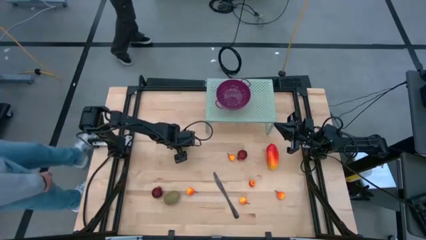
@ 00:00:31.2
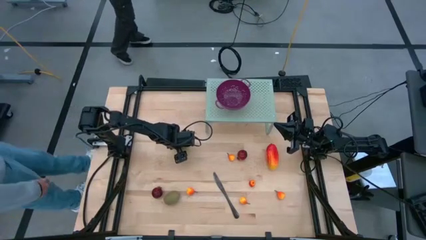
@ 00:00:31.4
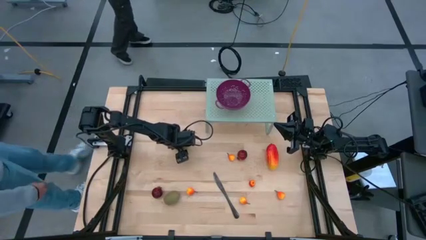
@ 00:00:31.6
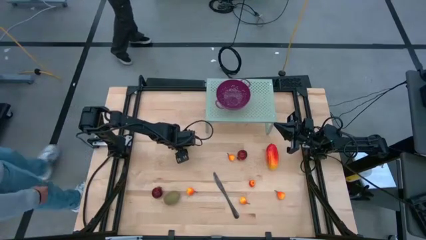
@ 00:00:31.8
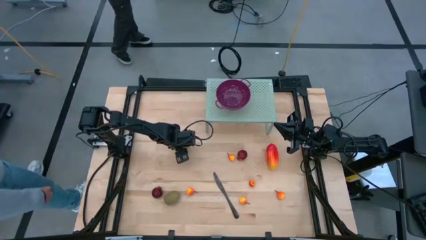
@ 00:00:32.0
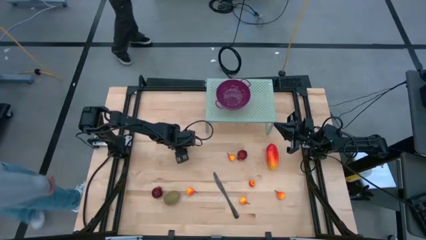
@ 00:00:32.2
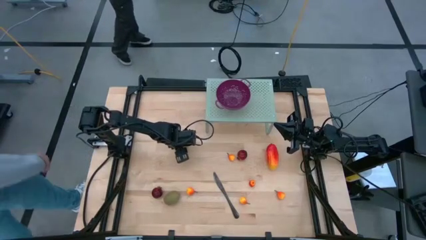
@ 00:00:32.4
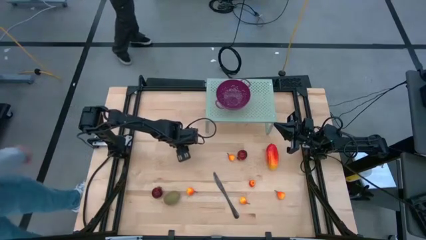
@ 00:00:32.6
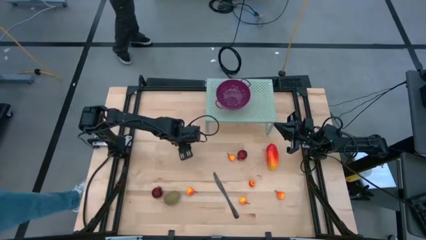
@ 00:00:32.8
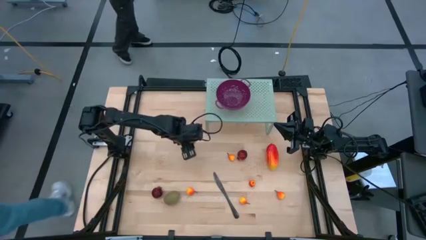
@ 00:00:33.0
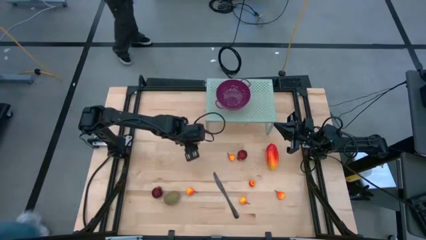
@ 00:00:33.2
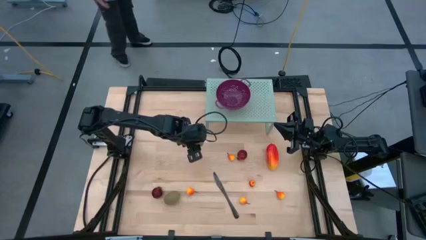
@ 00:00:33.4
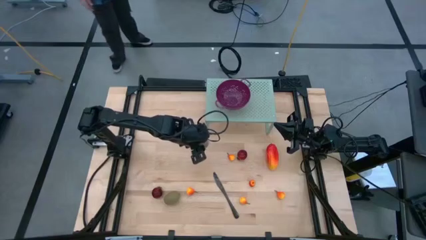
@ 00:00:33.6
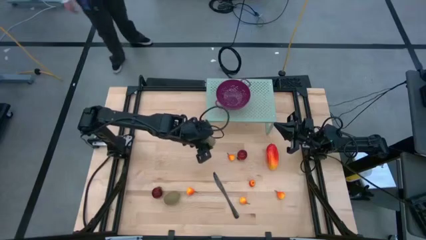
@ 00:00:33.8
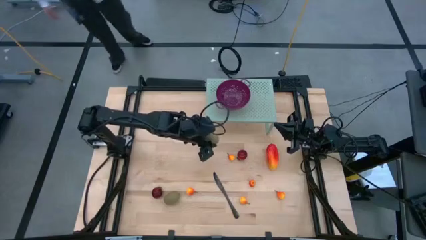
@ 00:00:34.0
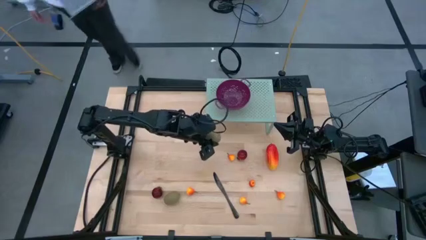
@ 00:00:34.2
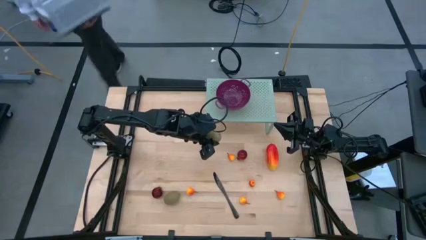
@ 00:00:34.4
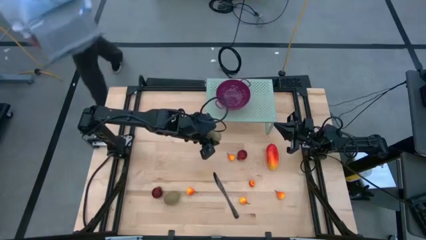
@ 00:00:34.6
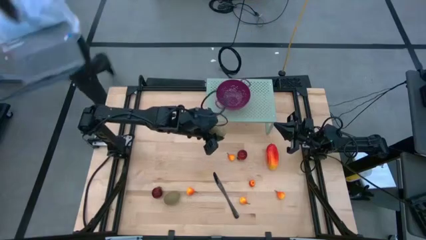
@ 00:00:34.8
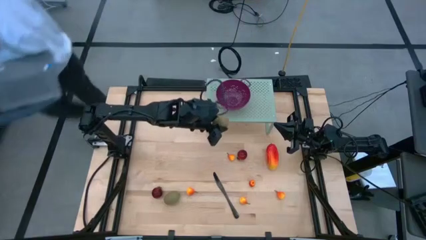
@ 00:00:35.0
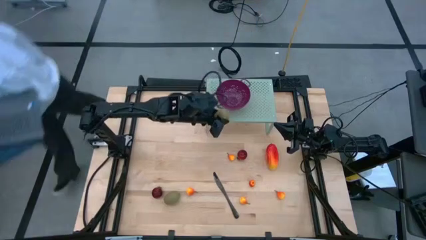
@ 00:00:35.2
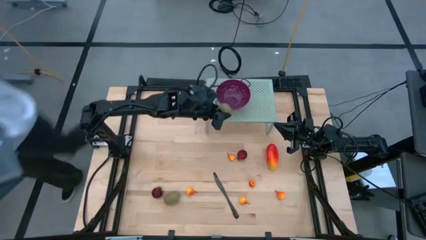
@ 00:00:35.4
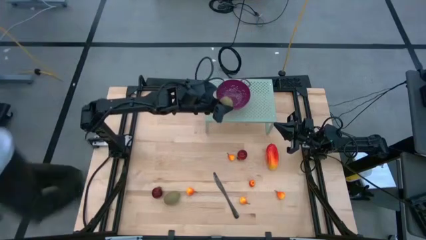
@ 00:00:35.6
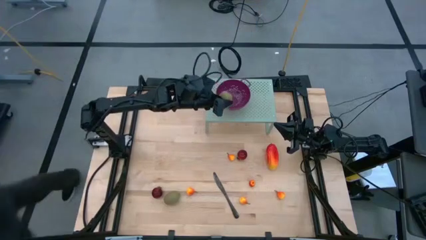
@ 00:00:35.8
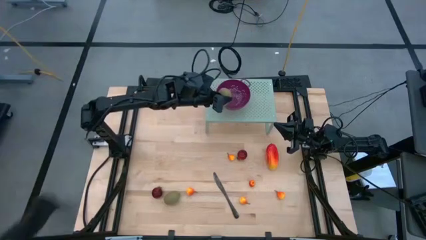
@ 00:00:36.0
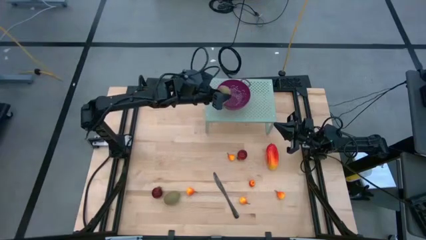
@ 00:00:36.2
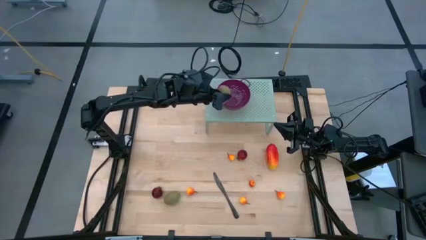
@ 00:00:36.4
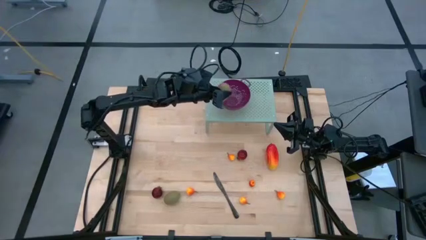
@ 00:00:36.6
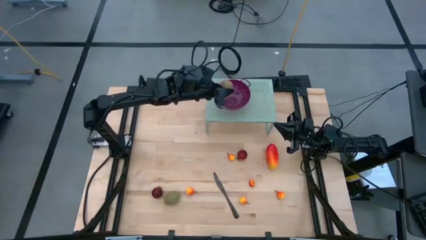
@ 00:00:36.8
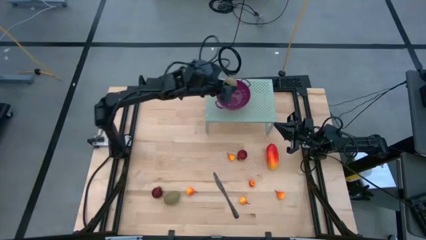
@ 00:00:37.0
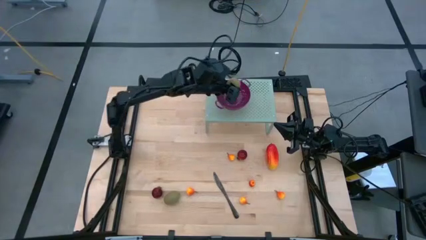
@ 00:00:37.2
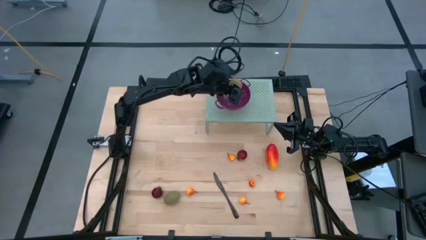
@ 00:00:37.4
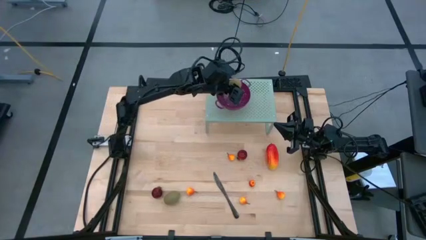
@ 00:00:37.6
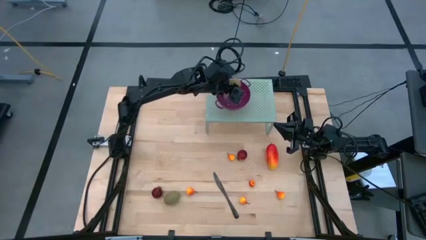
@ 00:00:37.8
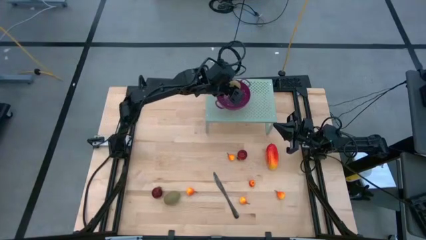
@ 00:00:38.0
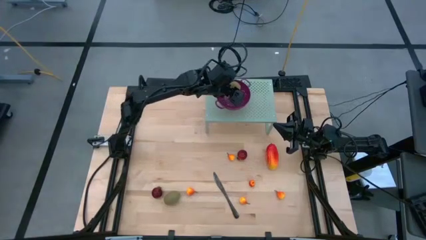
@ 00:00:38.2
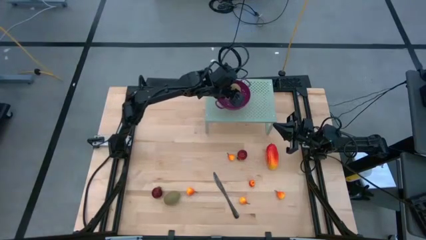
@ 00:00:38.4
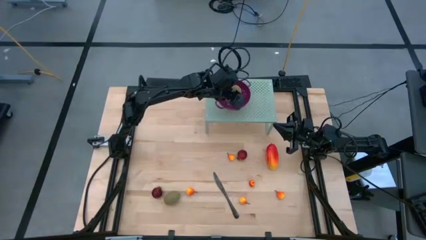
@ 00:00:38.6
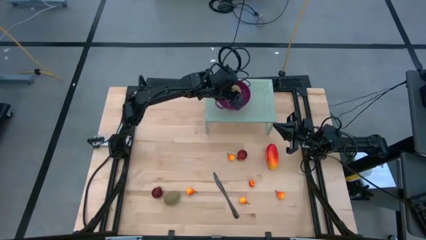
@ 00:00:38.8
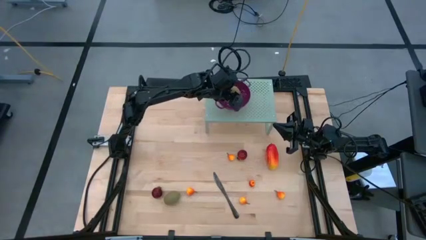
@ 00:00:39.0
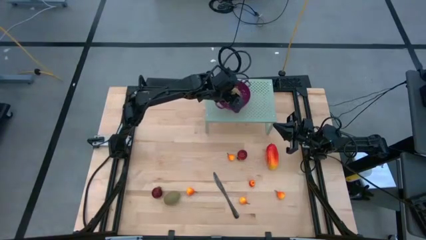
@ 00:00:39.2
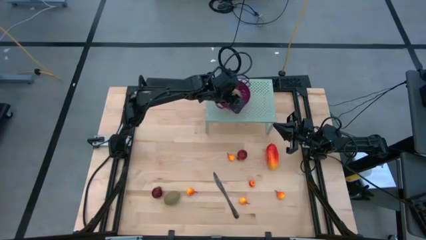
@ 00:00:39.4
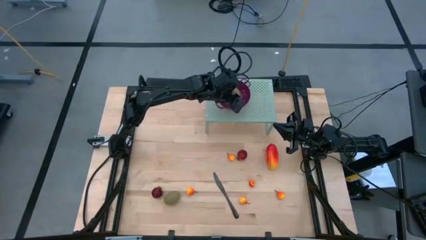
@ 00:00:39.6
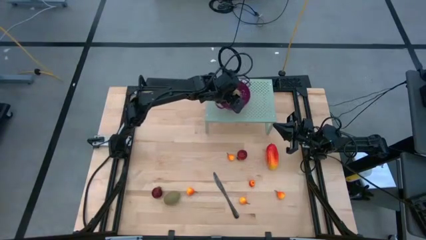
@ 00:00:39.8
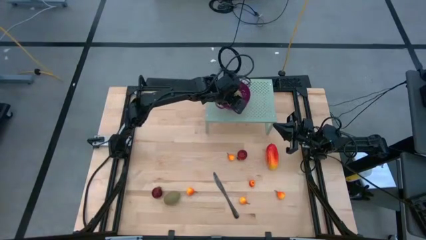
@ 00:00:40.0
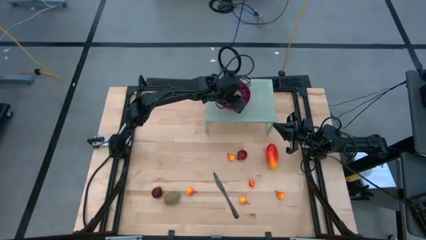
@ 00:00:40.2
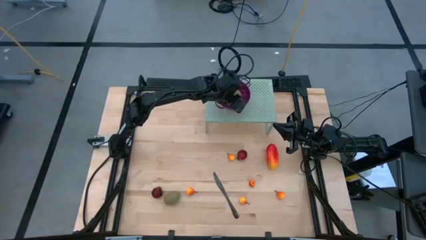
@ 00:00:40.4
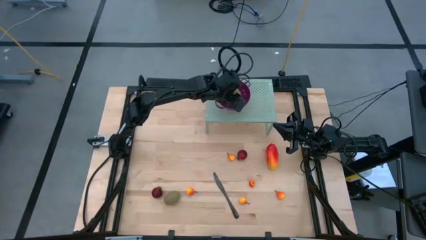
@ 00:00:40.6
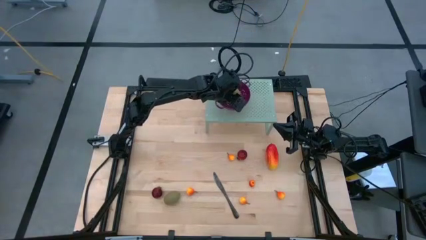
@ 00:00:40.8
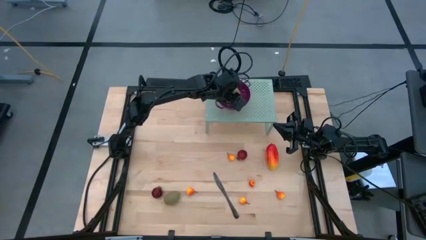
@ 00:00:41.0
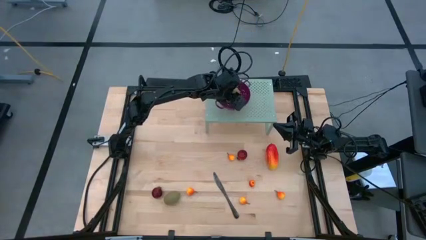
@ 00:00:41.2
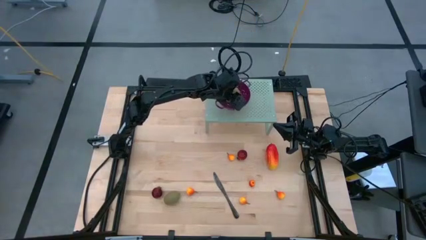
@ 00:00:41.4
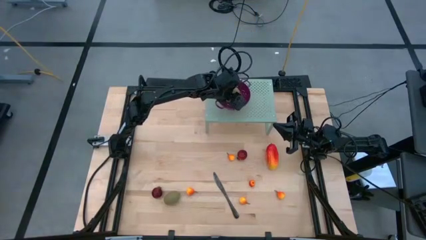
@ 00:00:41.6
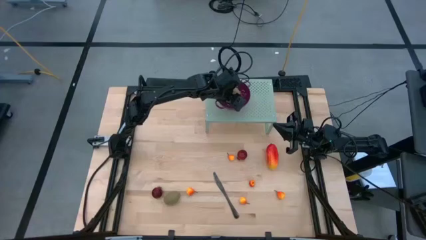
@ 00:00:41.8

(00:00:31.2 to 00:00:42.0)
Task: Pick & Place Fruit
Put the brown kiwi into the violet strainer bowl on the shelf

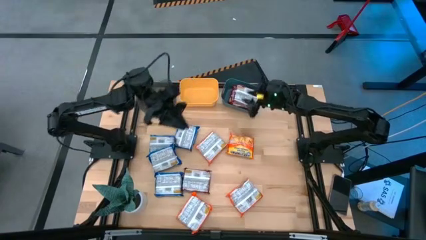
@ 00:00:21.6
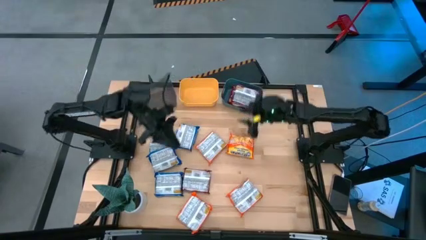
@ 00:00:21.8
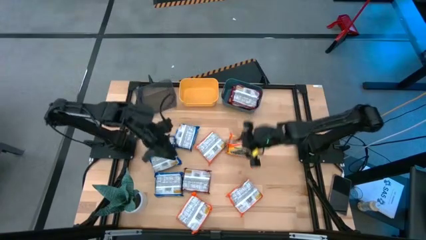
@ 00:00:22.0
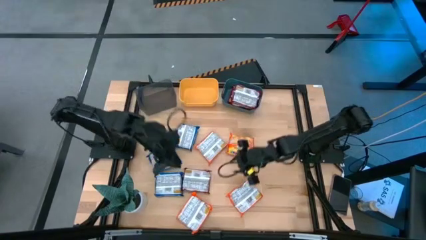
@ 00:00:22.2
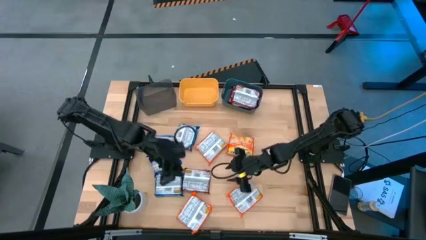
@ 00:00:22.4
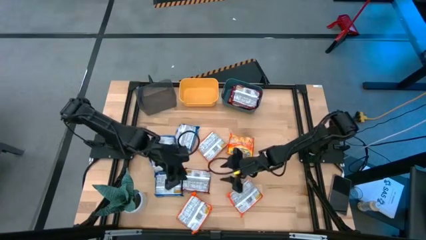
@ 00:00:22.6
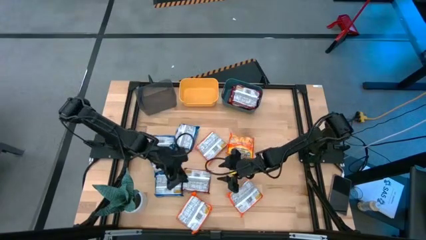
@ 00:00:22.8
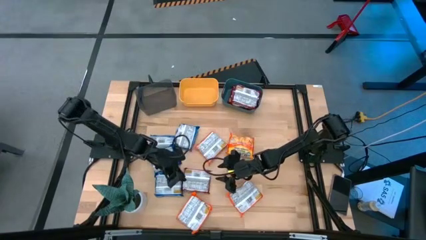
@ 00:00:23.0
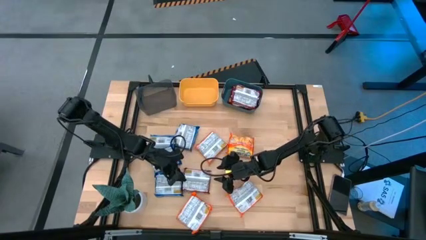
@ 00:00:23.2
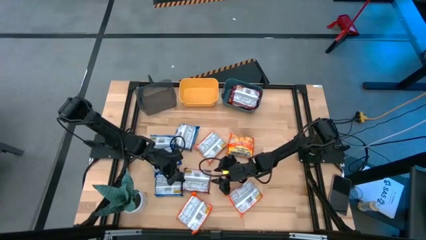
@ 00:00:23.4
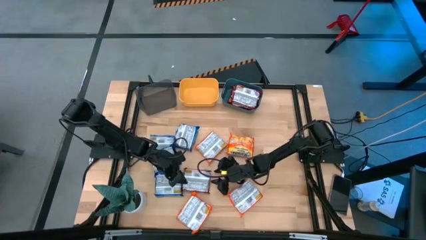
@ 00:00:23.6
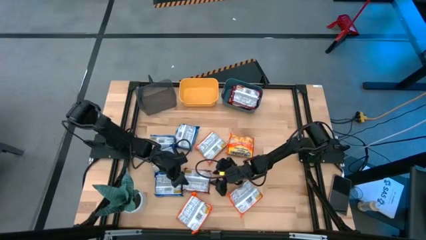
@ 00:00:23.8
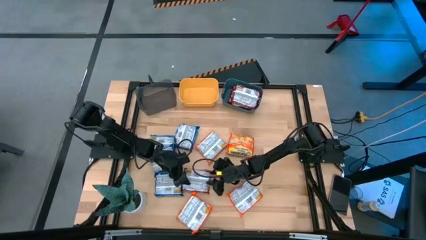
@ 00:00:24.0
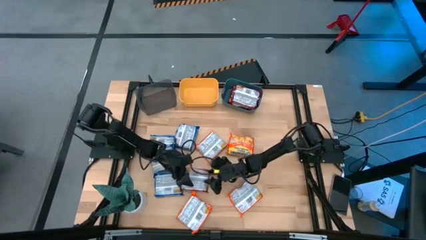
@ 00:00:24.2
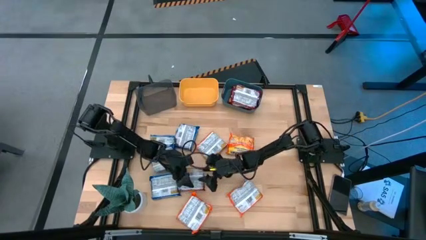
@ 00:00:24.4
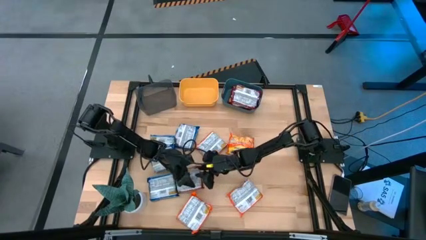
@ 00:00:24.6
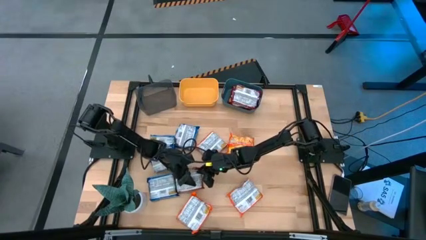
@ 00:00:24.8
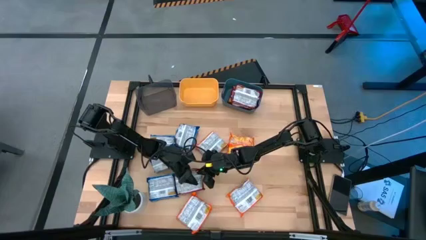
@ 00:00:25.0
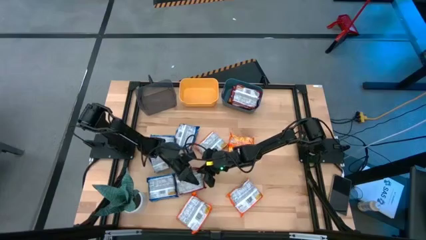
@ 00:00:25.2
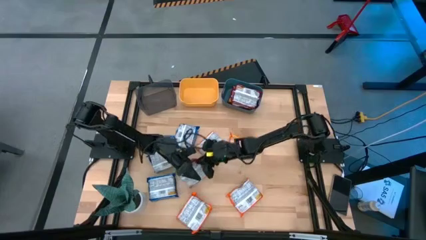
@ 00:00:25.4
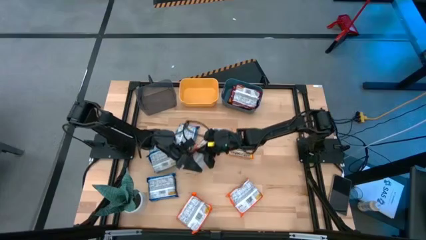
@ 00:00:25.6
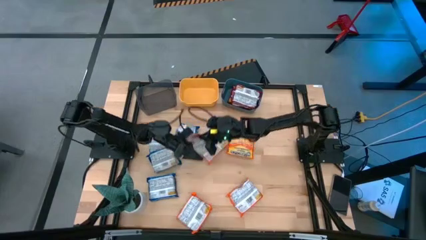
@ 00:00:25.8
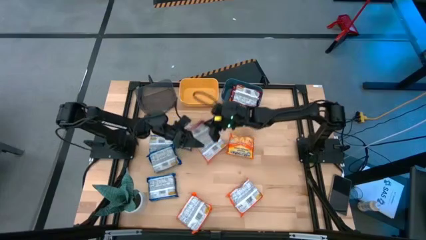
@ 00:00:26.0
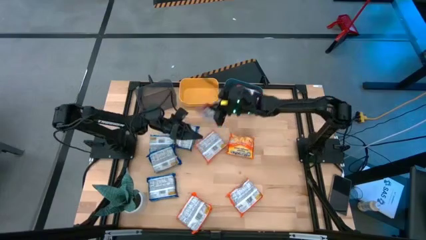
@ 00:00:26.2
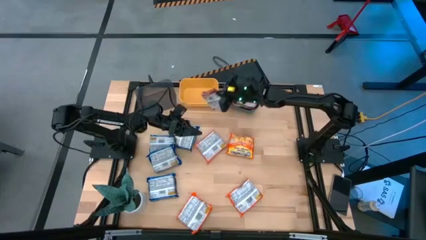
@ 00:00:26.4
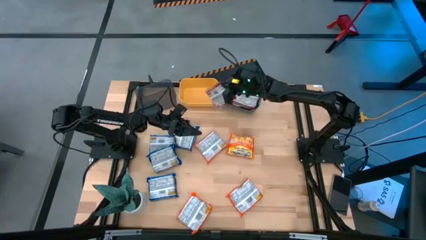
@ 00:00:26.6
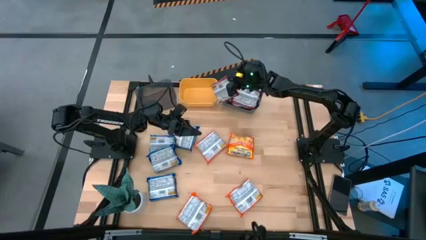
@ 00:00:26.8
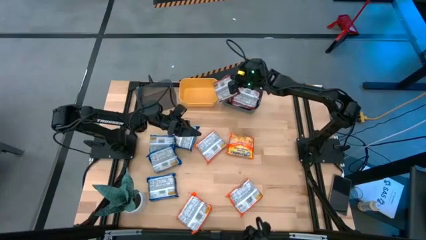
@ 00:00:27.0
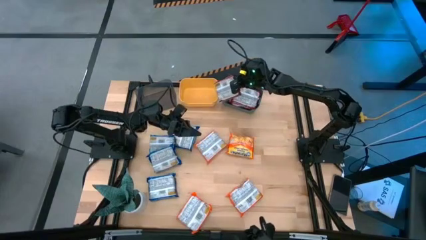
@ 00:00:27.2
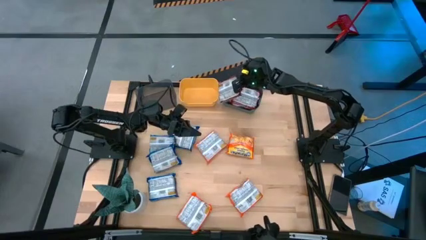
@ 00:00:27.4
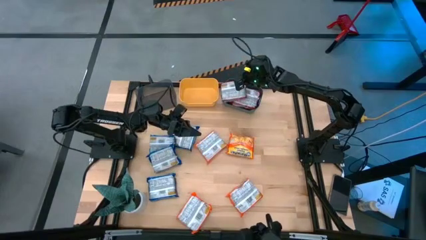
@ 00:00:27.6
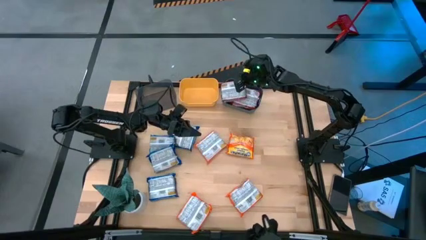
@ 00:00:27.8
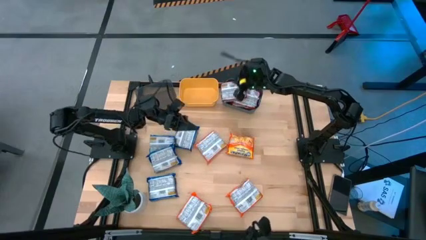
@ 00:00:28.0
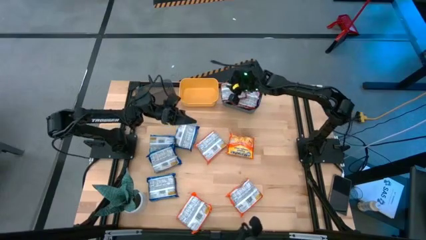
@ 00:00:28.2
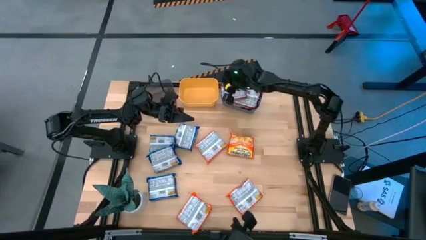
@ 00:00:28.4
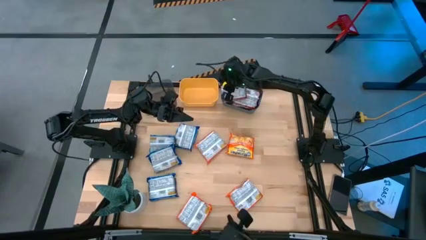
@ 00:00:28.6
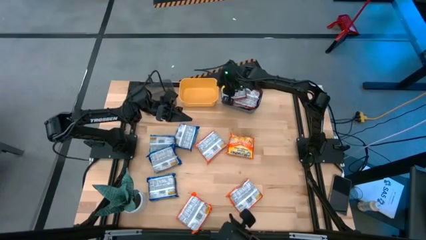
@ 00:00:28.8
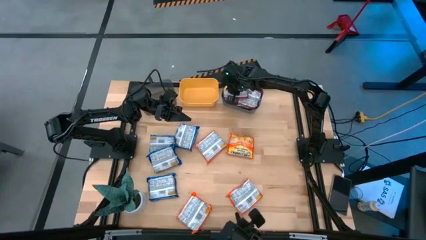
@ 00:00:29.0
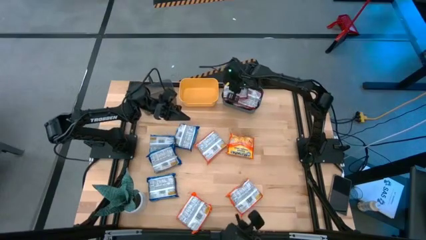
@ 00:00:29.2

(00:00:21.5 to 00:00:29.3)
Task: Sort Maruchan noodles
Put the red noodle pack into the blue bin
